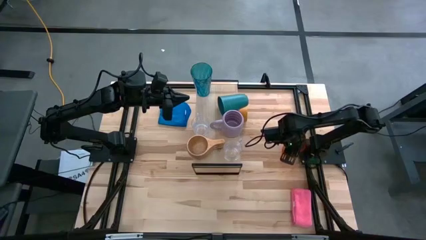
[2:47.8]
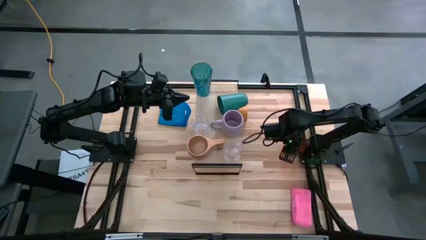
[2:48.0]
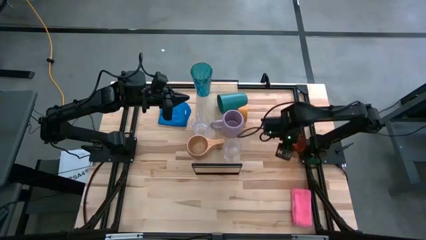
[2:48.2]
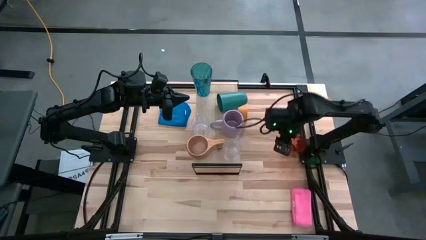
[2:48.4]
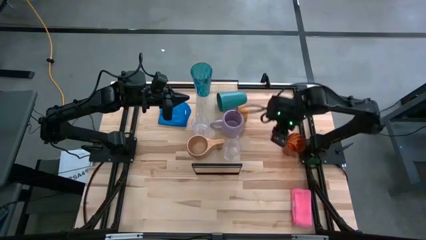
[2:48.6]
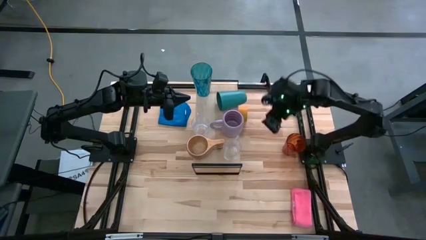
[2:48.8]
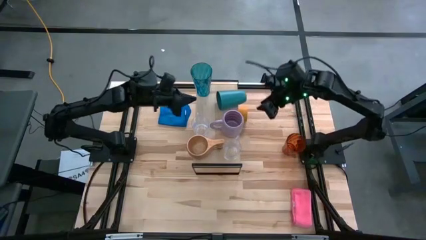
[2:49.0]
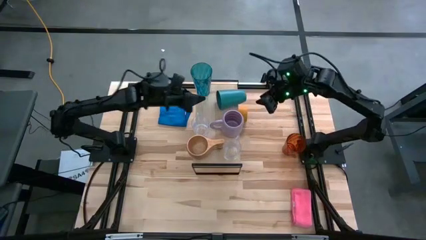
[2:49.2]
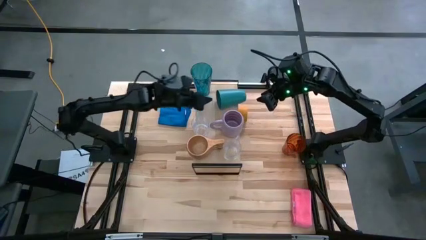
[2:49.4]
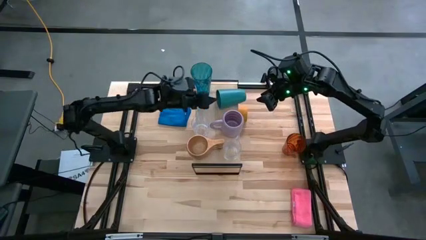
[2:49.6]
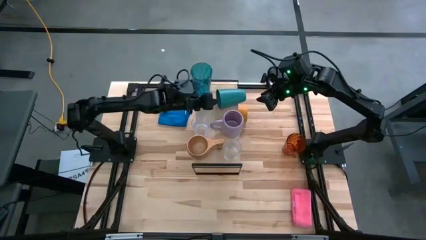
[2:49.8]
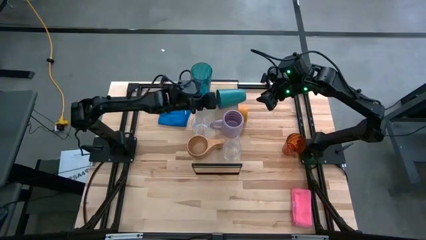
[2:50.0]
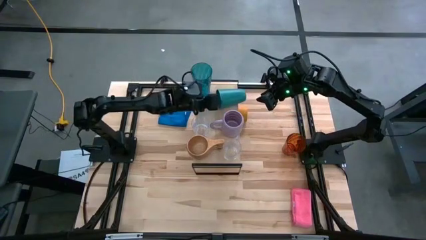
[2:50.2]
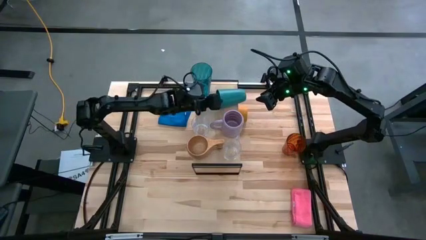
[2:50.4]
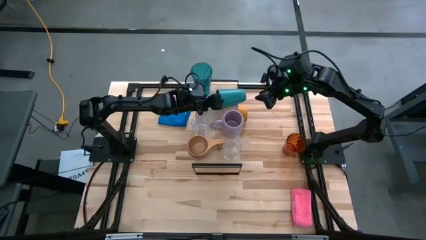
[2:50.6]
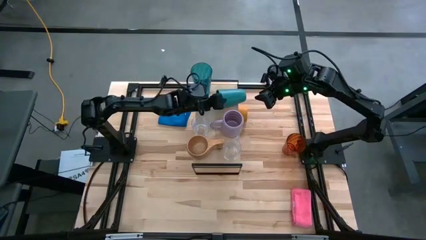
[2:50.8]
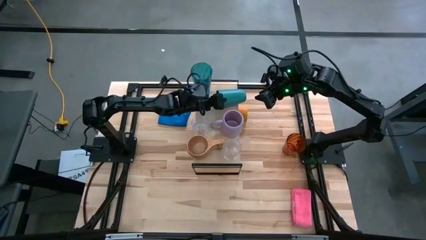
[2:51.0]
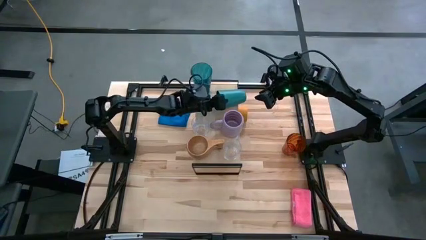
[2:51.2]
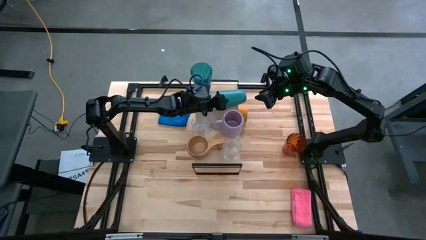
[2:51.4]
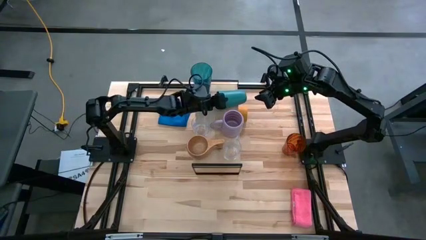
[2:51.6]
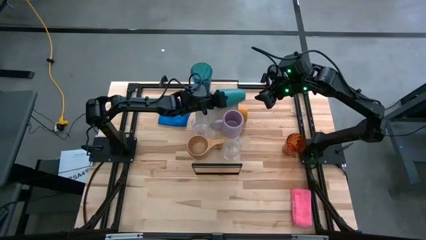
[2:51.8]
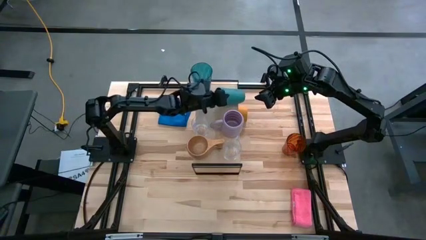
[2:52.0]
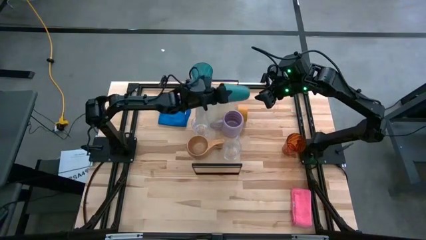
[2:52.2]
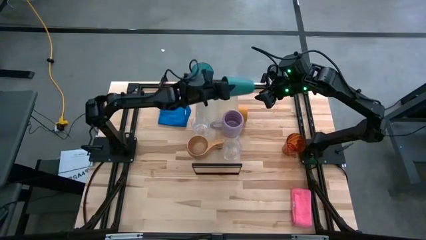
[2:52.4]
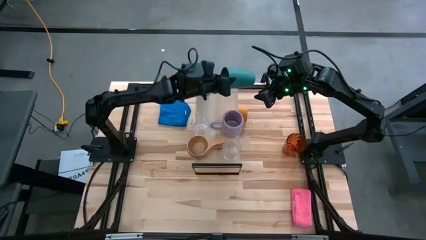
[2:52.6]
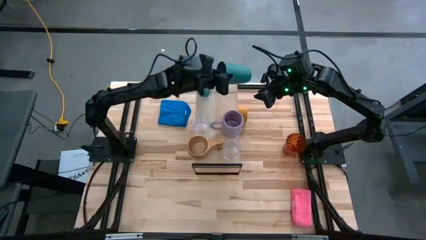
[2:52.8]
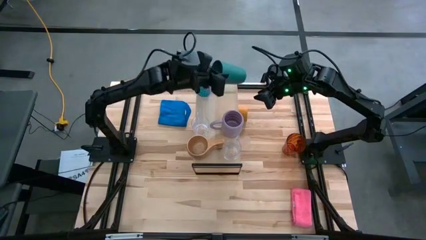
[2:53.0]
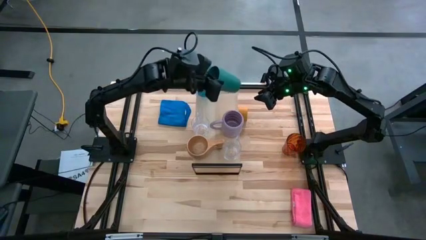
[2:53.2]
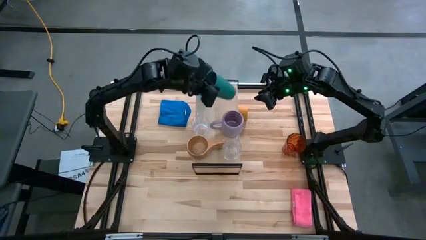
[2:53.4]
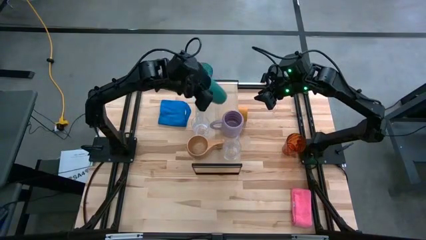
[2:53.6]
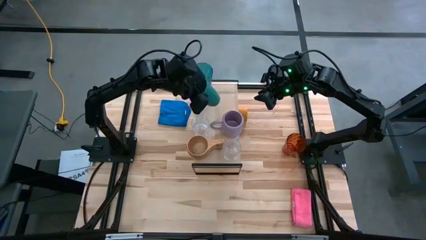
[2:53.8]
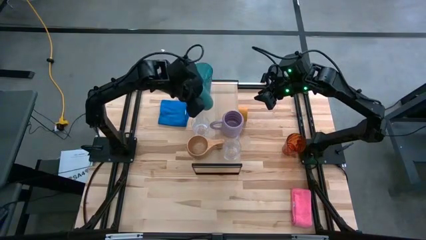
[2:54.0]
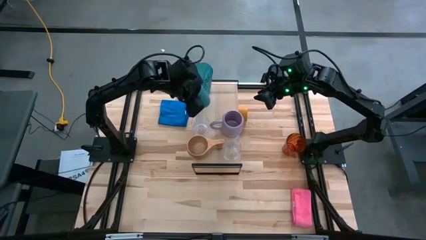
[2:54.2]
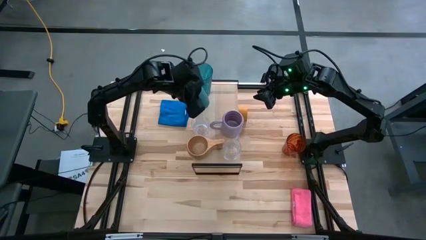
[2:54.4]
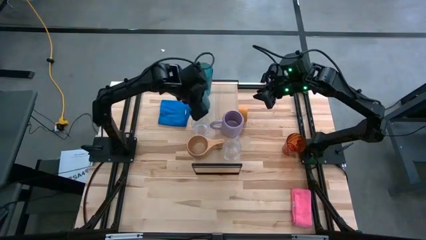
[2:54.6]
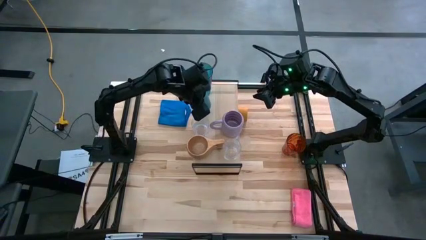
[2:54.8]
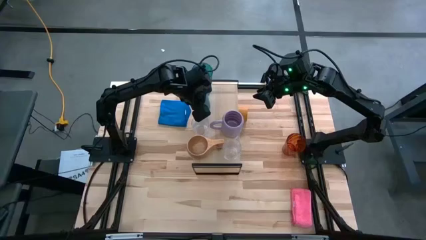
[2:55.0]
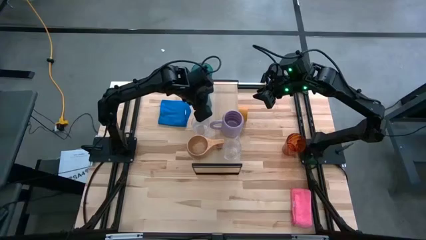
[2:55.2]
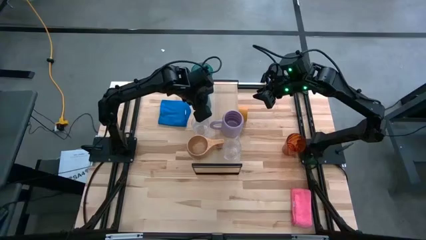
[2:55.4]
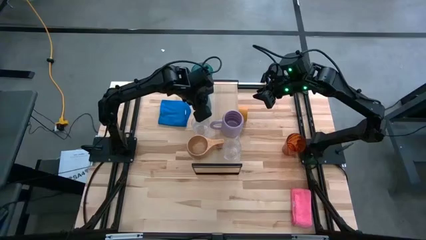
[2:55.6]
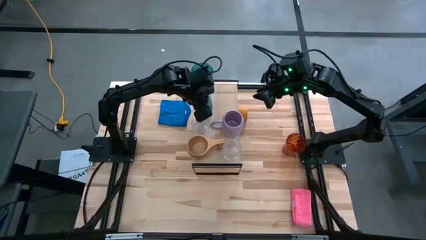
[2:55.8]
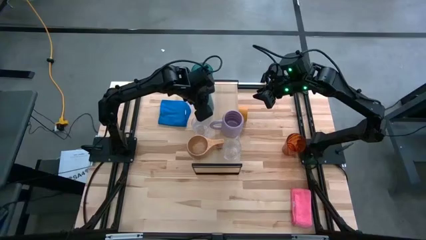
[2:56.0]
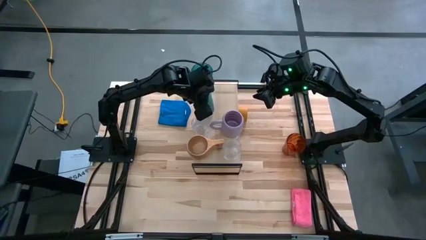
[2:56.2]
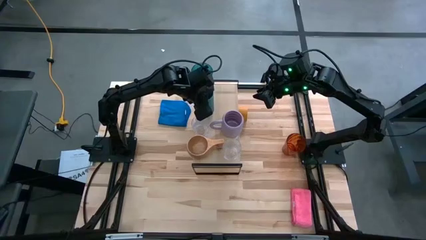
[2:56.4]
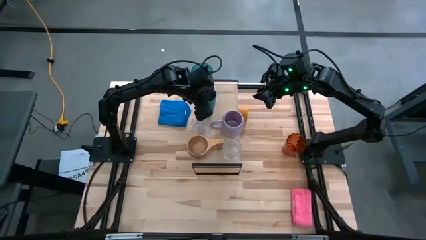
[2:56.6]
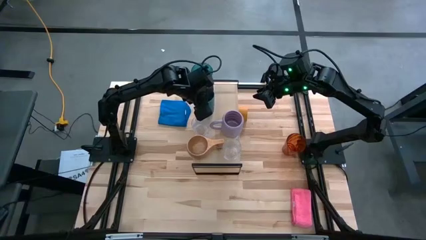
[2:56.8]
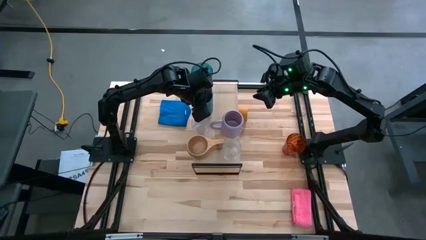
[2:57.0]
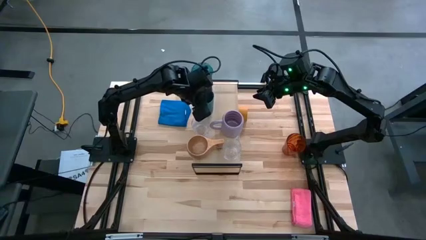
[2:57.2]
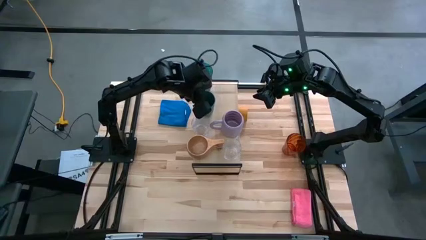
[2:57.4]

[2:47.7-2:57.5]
Task: Stack small to large cups/mugs on shelf
Adjust the dark blue cup on the shelf

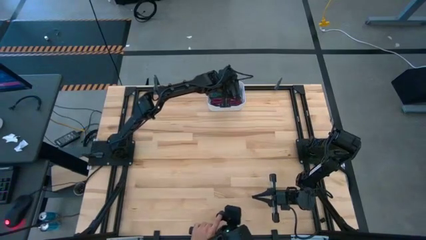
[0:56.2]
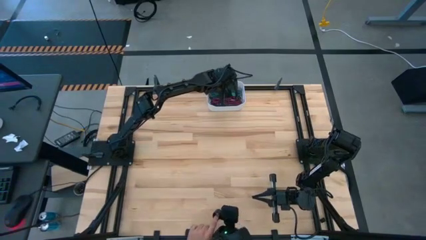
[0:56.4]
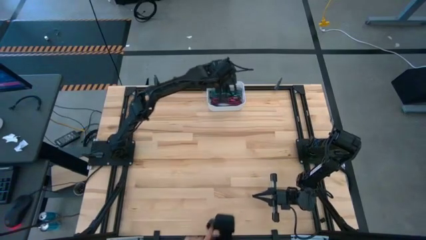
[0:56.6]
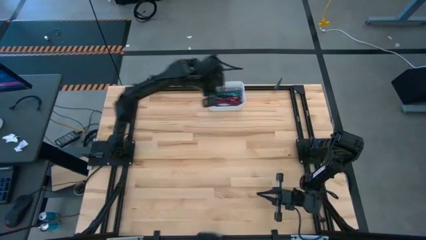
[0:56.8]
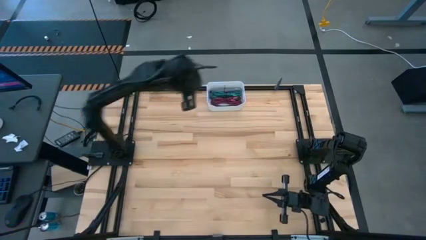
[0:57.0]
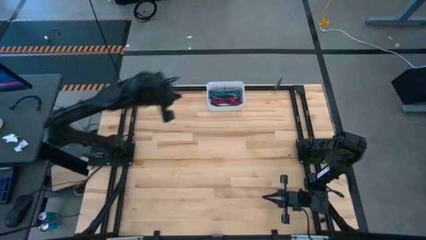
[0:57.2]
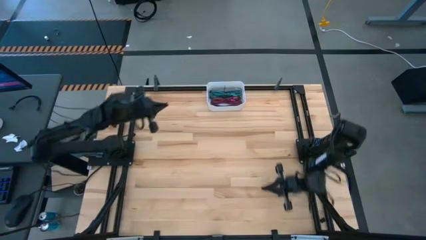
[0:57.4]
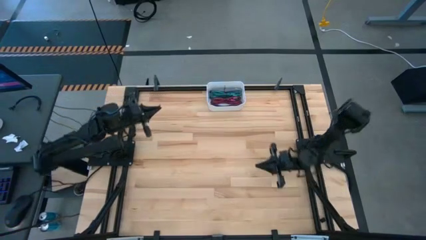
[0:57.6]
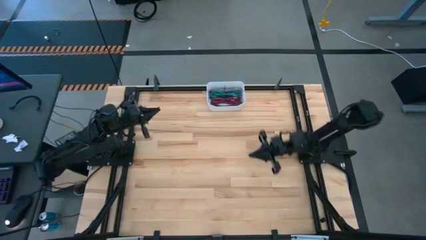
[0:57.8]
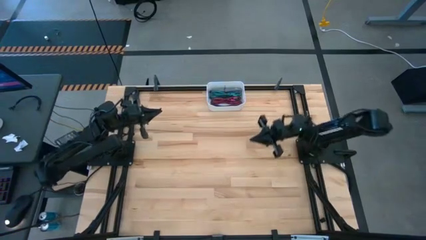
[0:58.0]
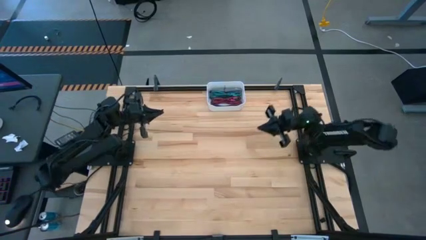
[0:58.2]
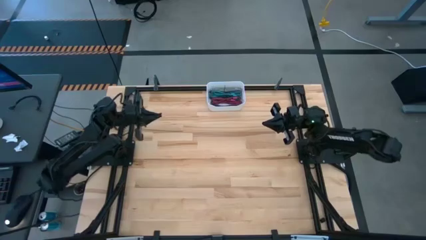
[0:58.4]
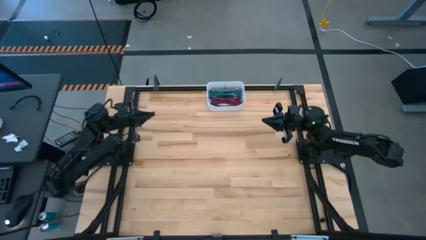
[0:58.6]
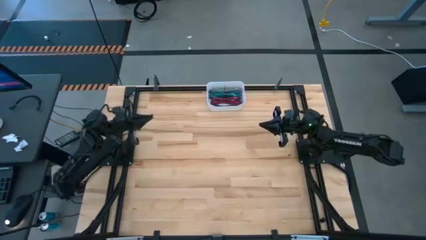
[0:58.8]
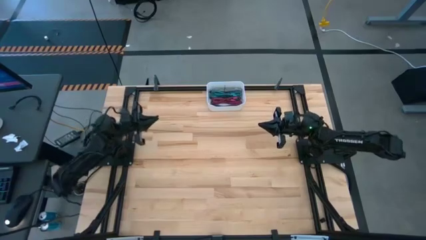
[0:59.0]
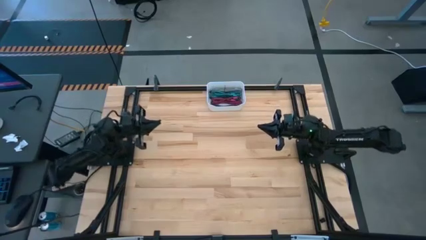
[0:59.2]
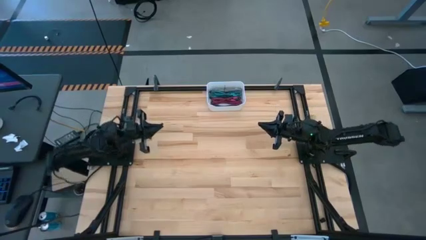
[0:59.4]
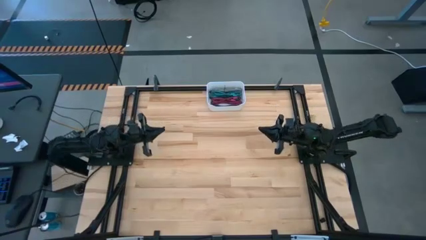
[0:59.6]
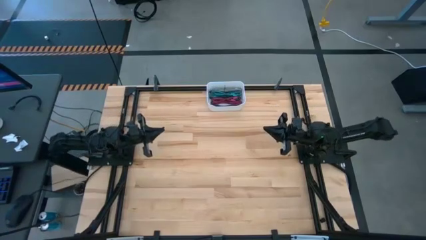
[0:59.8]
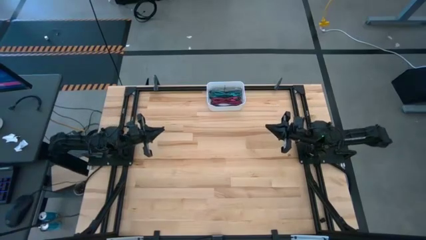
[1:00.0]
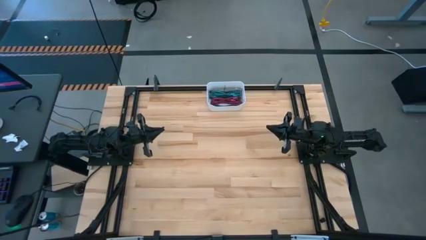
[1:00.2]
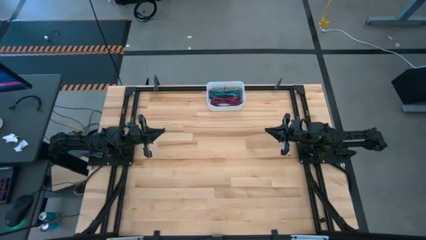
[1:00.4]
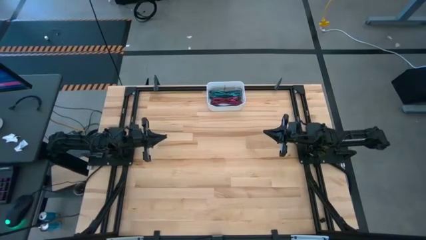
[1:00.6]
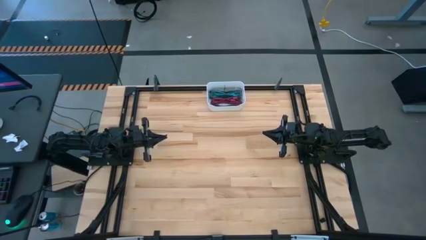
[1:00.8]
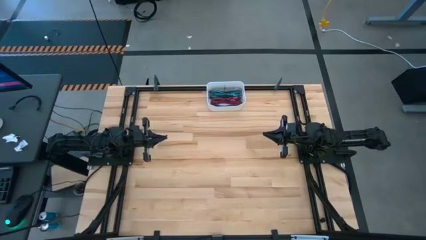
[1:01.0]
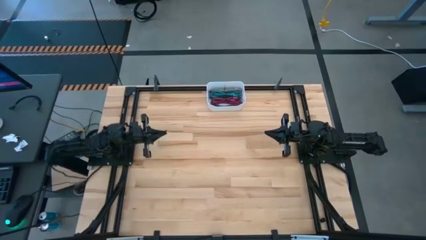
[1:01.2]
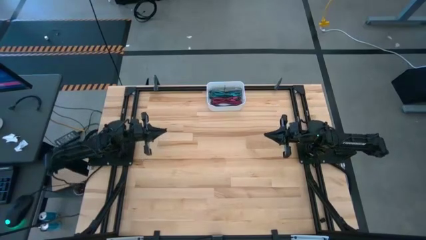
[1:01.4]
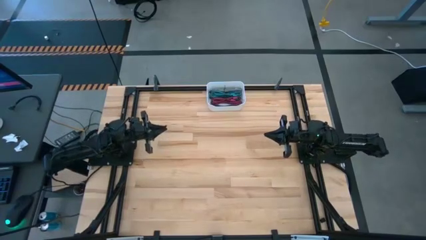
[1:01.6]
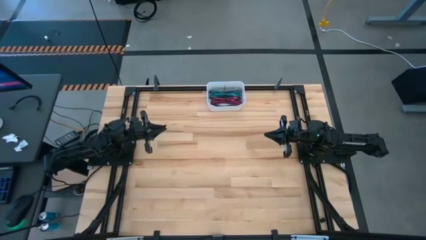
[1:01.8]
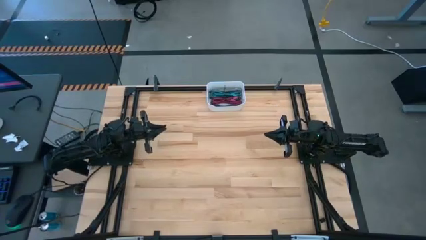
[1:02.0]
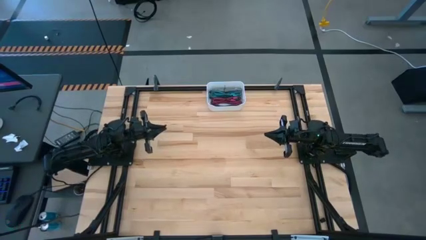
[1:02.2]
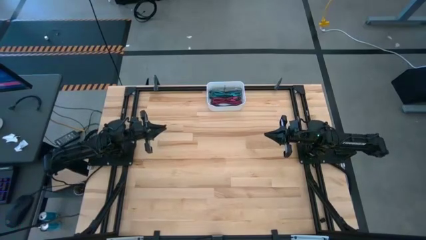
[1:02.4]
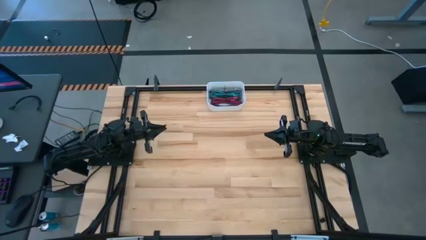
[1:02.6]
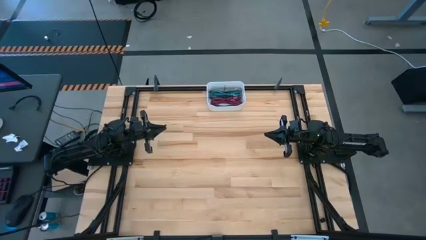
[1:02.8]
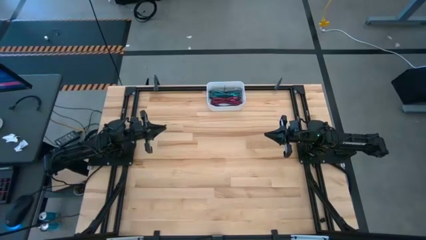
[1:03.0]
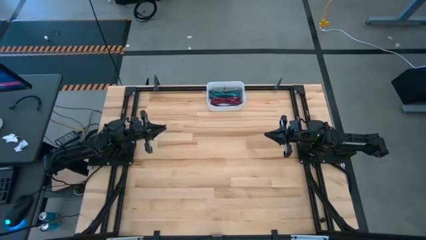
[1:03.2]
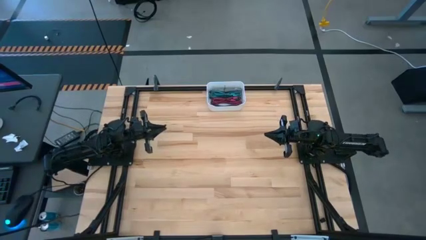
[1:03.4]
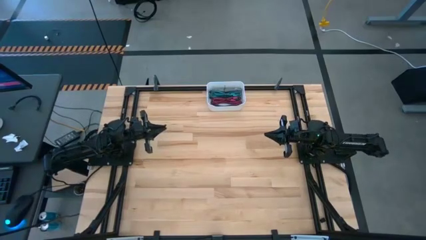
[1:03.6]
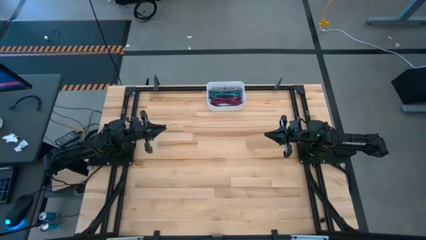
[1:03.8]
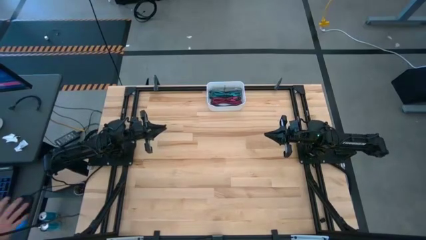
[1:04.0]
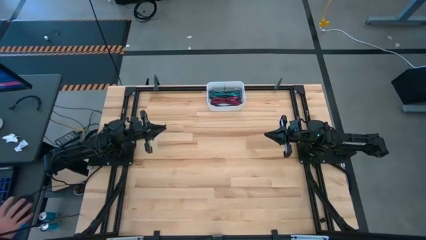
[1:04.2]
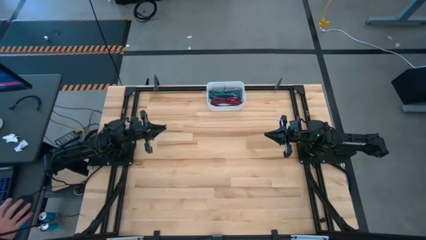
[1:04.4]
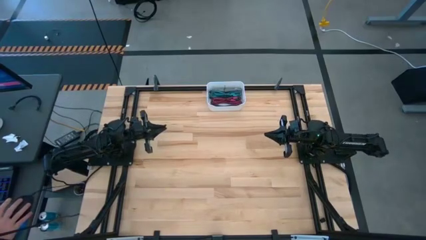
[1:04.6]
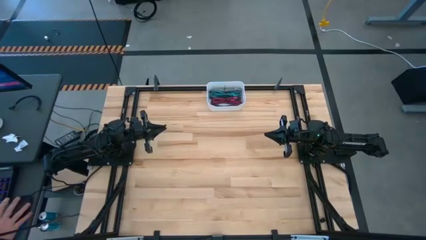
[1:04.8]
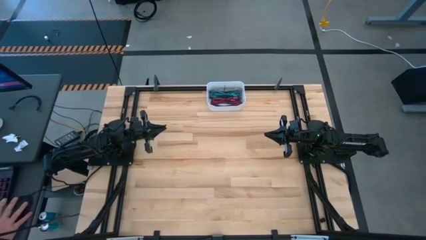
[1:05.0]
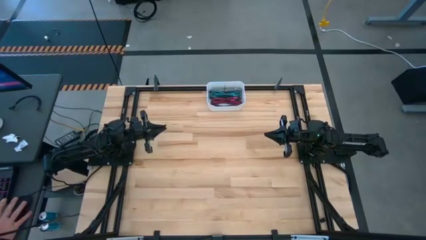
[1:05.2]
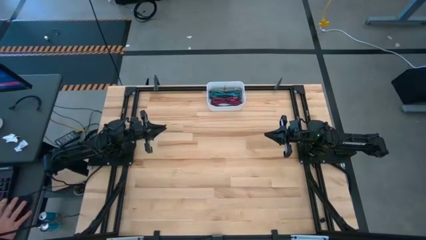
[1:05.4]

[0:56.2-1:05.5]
Task: Pick and place USB-C Cables
Return to Home Position
